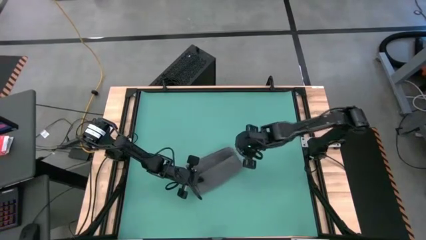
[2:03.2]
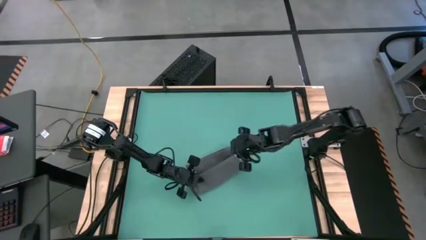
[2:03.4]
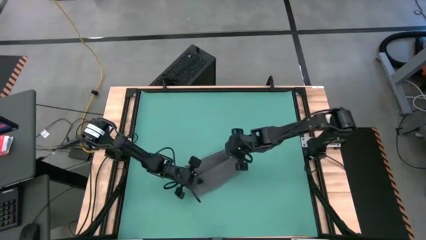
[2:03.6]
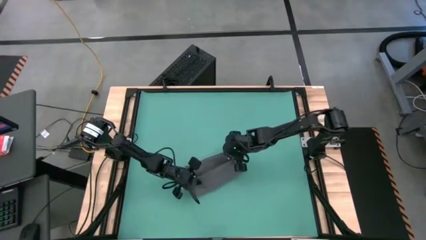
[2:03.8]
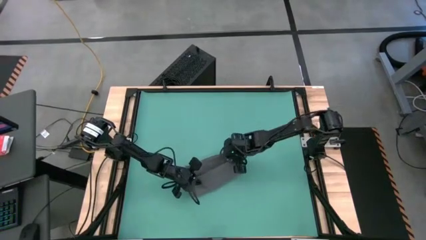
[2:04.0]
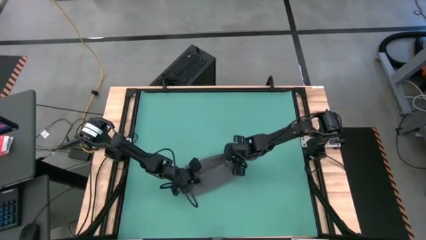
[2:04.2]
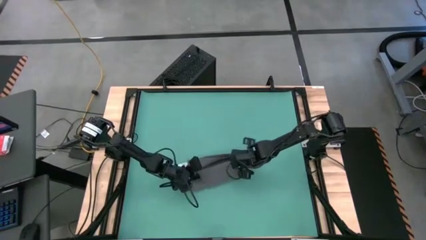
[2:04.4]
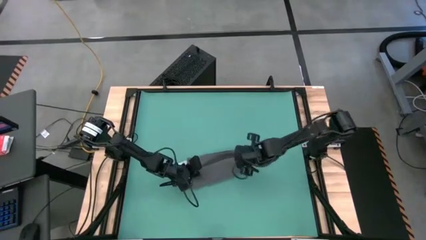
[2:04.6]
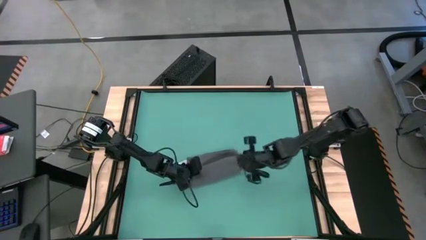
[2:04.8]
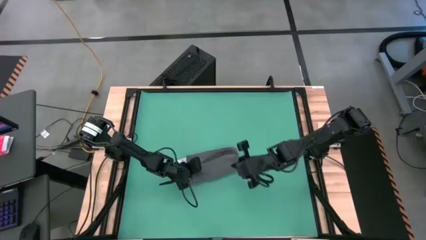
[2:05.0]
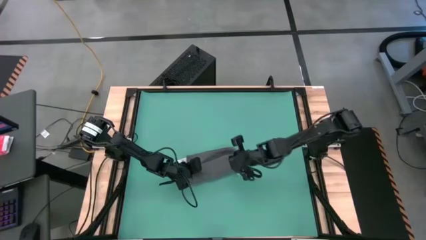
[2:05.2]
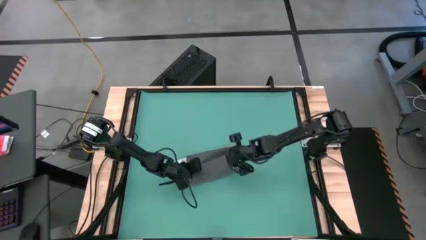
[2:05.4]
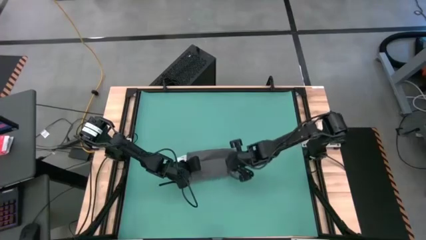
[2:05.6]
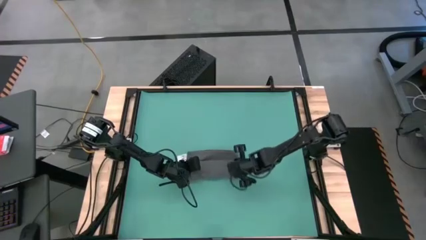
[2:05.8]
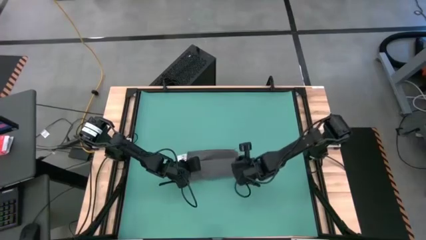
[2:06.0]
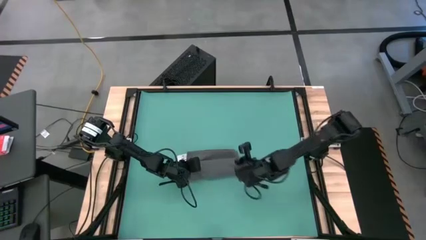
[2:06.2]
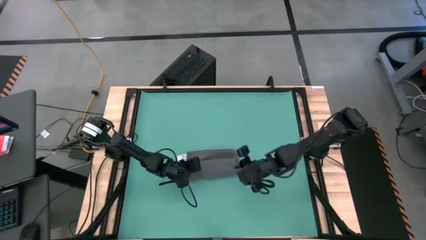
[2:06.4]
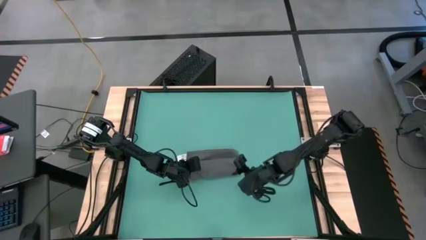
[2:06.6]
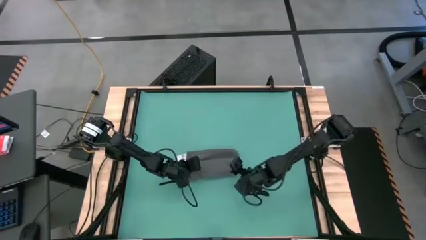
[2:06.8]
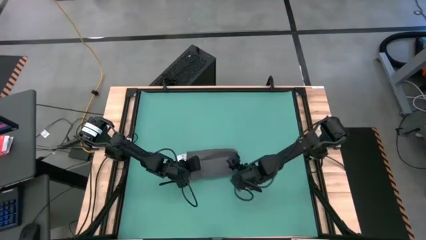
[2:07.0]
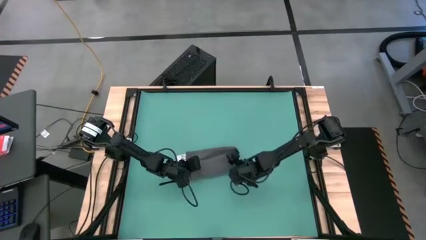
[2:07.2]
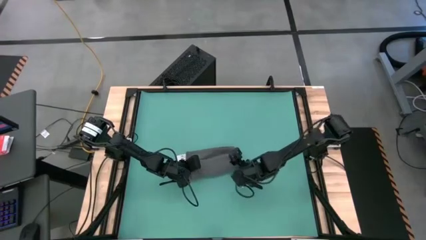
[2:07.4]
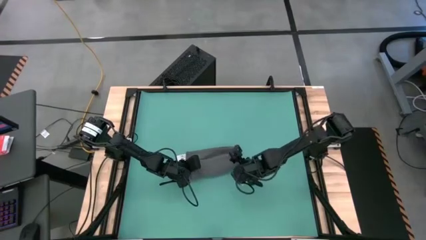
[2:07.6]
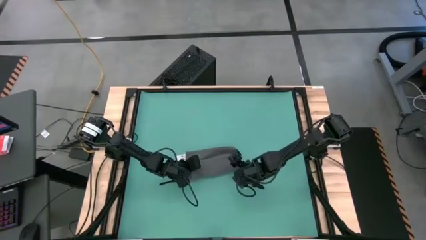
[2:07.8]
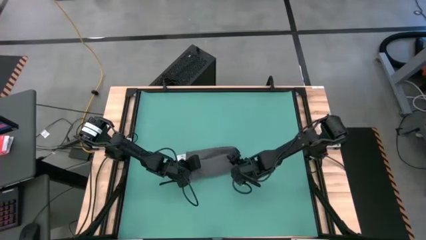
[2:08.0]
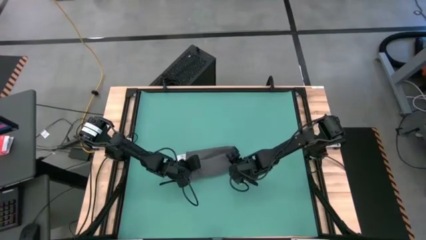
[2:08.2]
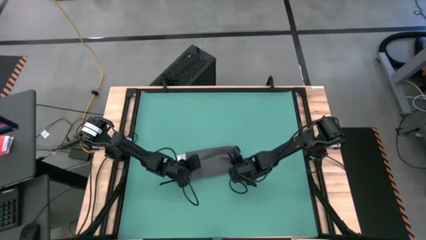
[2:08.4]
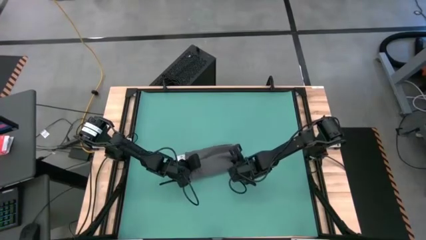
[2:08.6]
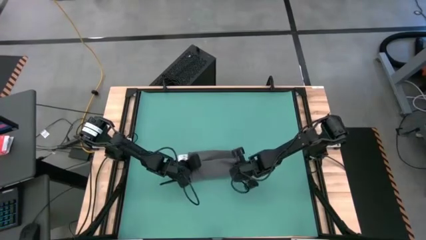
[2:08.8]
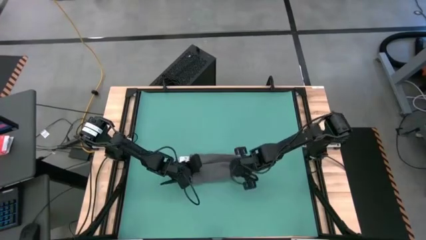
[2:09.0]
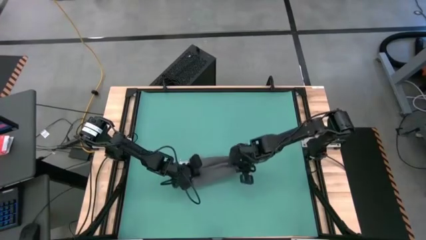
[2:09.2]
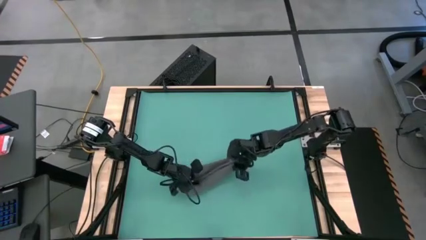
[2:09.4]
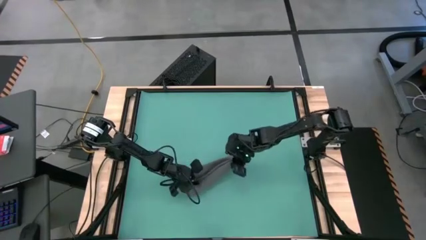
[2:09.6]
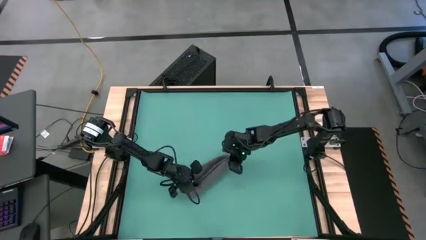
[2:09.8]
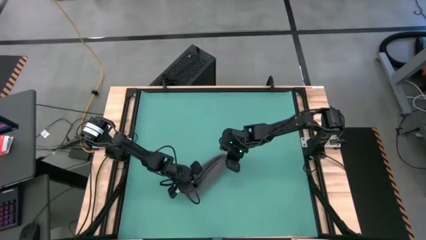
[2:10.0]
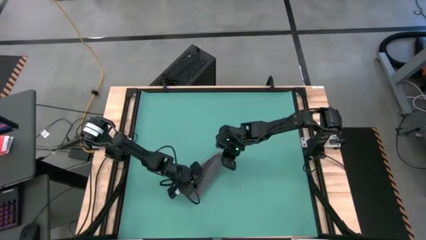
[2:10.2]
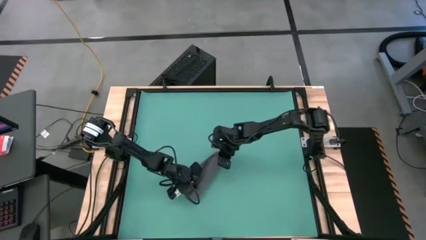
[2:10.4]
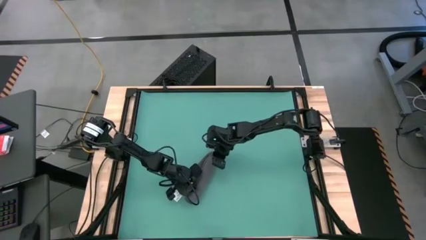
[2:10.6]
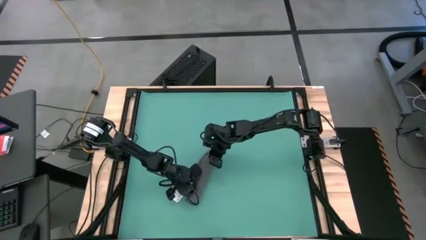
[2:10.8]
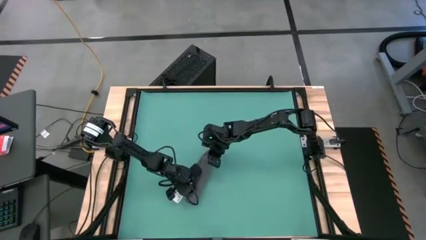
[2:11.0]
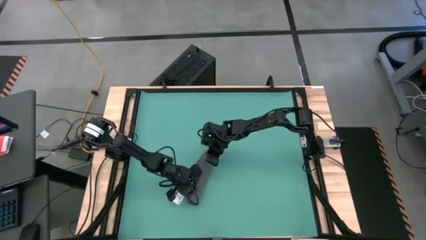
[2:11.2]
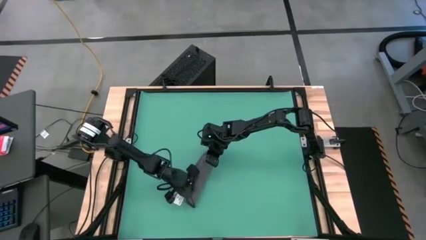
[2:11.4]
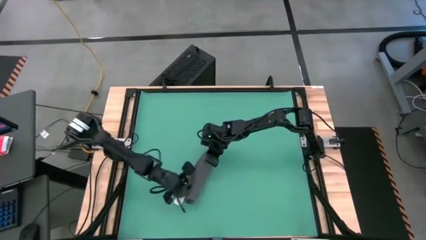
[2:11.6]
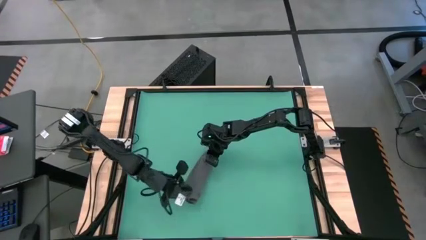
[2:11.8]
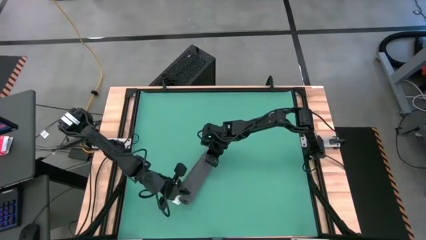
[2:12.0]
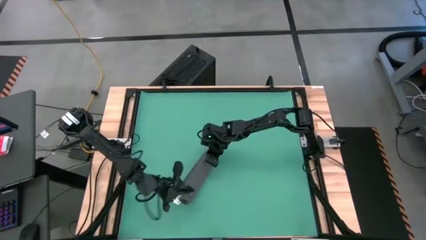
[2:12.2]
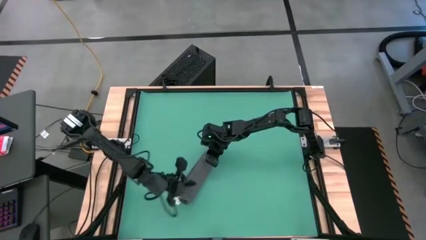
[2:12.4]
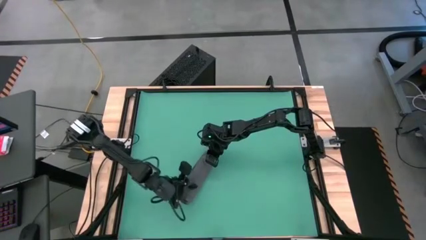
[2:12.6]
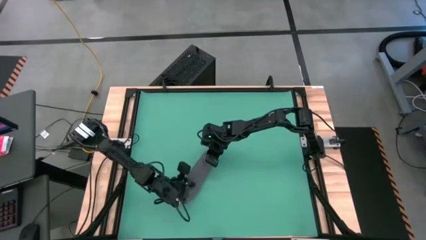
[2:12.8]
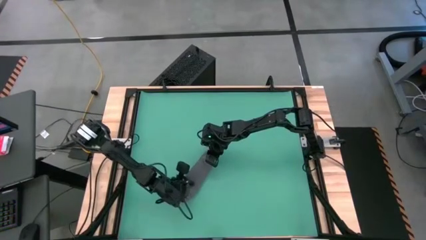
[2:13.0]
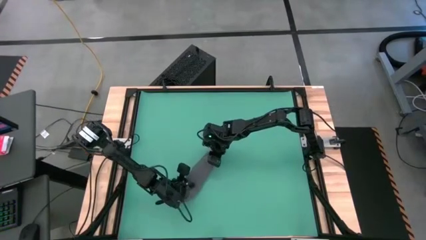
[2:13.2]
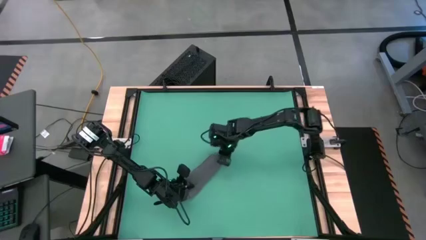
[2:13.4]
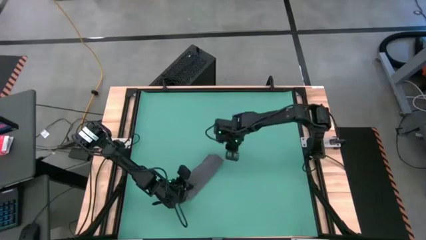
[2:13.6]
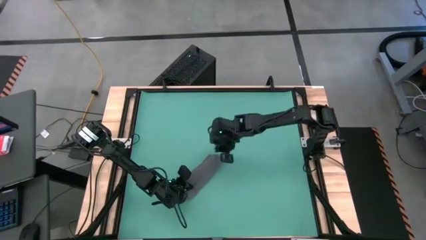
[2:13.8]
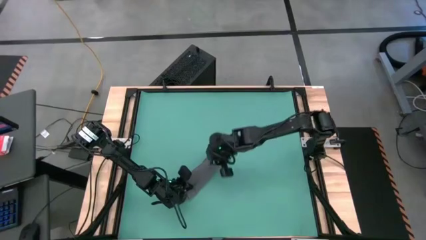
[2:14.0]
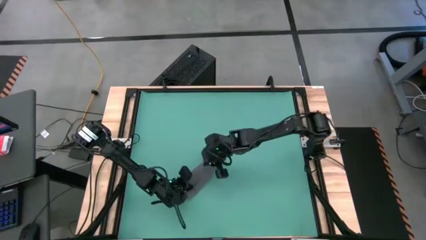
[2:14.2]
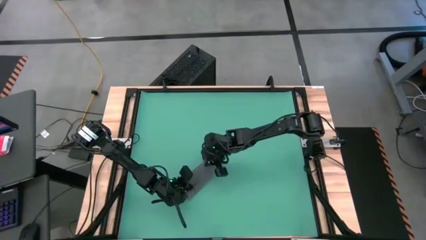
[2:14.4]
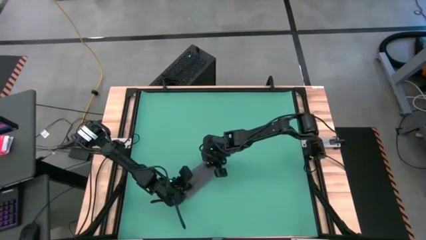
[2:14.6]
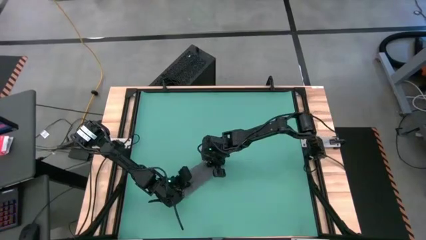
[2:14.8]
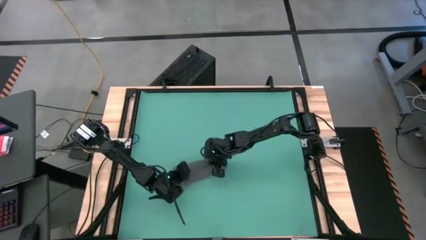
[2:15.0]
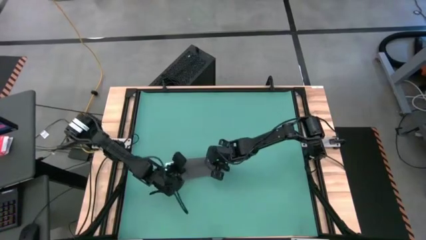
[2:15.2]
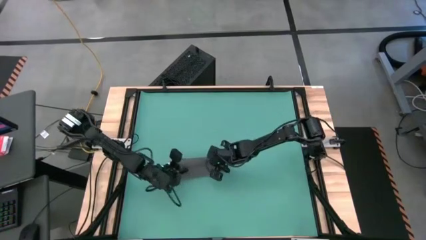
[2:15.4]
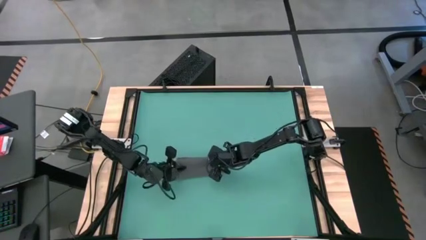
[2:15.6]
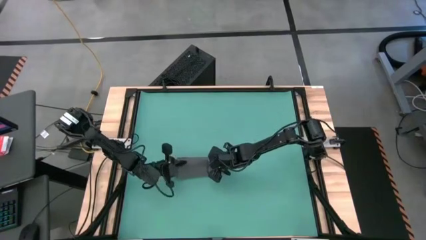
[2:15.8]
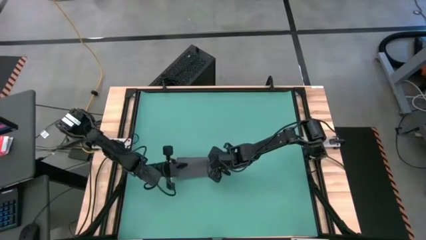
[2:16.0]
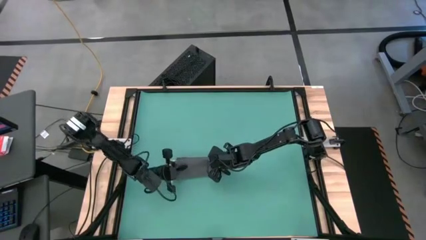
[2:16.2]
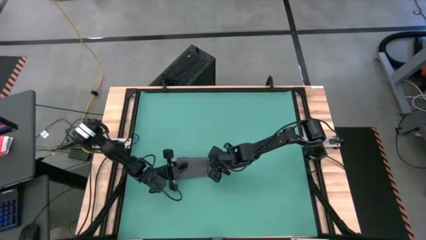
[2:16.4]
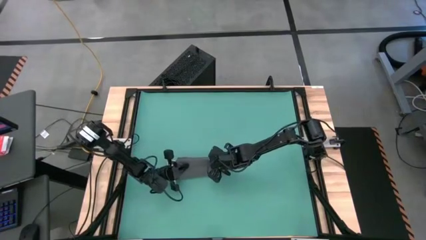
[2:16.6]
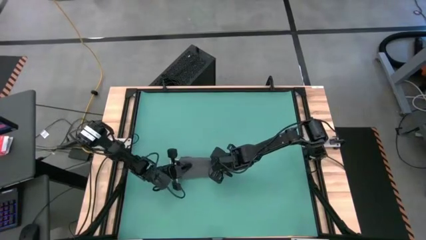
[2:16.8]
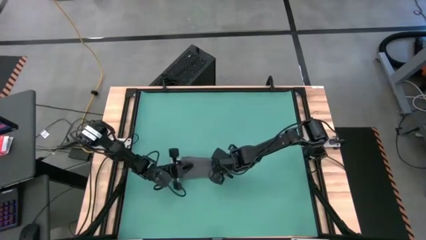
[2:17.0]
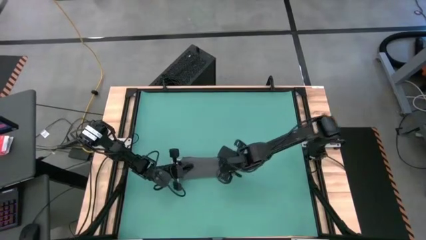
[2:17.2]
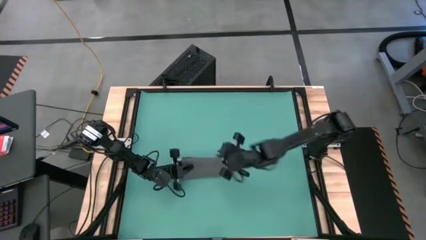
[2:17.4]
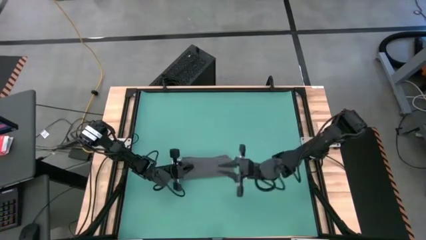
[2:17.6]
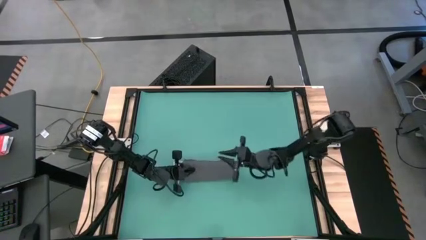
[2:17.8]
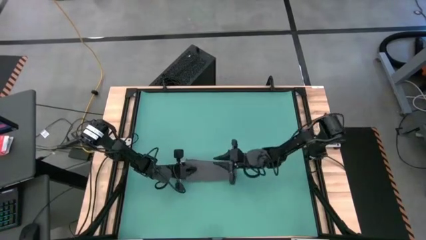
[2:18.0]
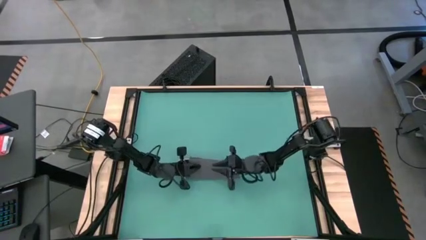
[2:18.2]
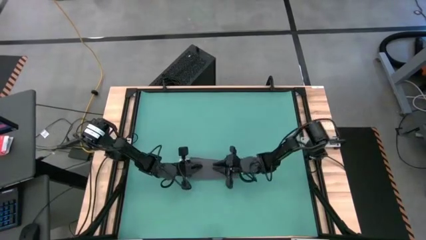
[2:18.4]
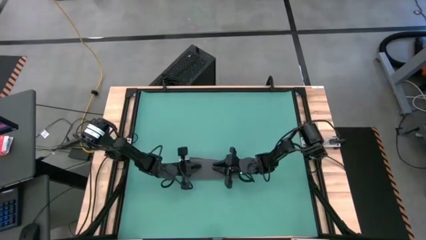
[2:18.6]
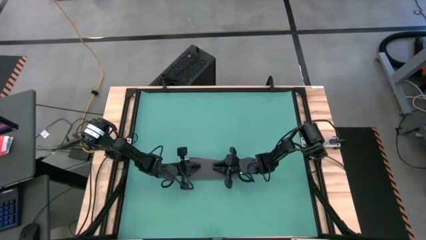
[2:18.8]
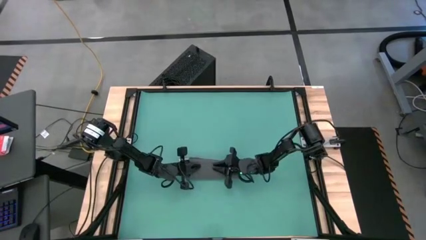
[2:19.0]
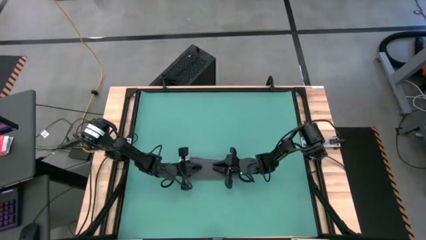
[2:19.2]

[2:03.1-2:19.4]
Task: Roll towel
Roll the gray towel
